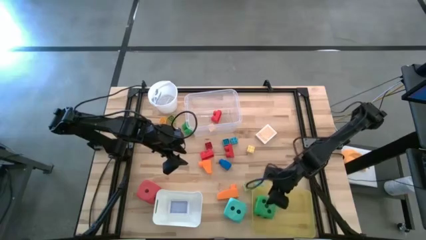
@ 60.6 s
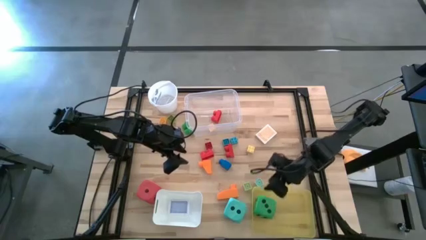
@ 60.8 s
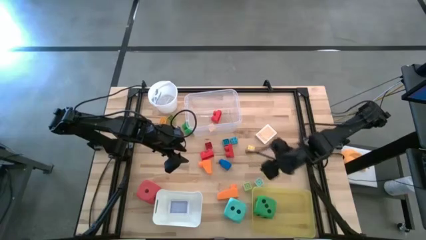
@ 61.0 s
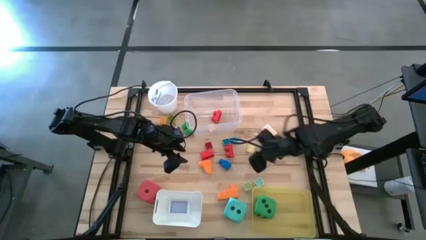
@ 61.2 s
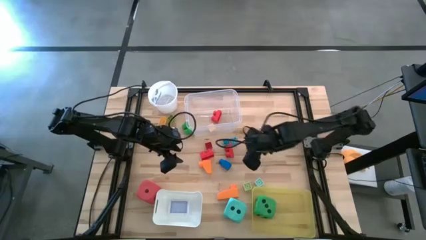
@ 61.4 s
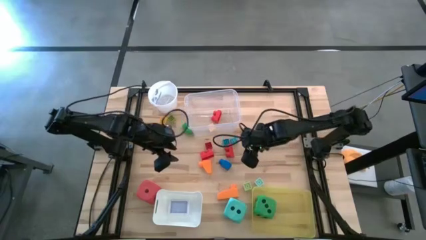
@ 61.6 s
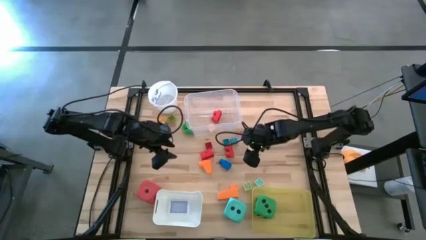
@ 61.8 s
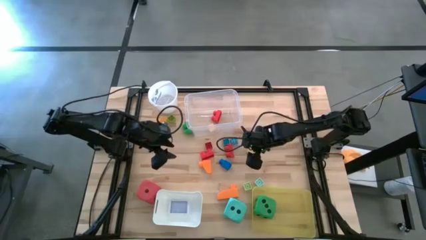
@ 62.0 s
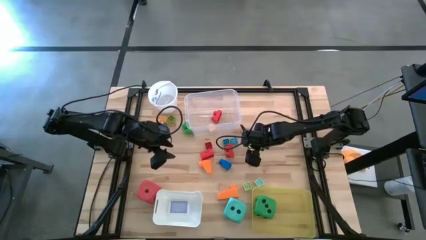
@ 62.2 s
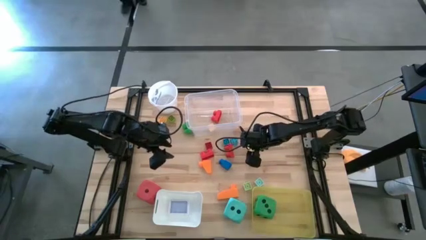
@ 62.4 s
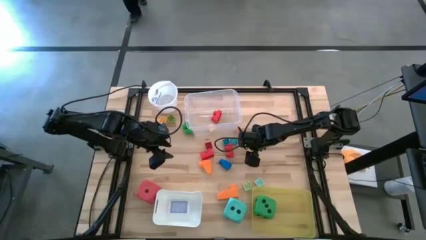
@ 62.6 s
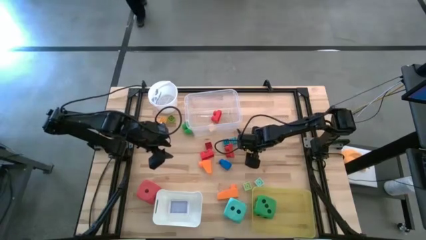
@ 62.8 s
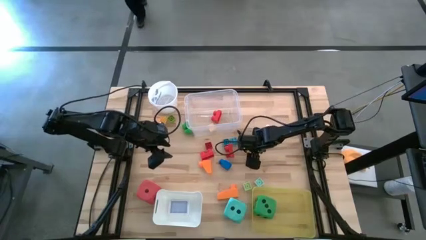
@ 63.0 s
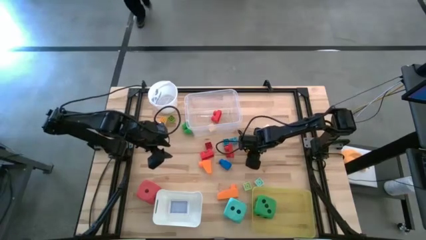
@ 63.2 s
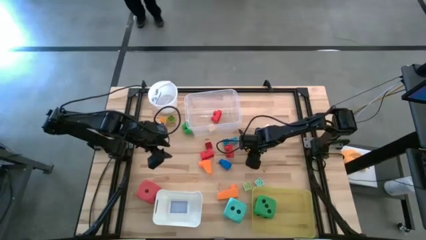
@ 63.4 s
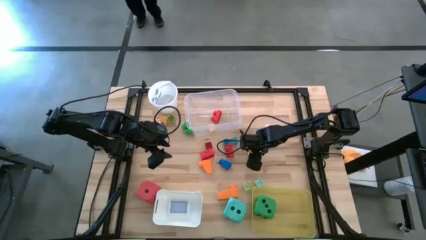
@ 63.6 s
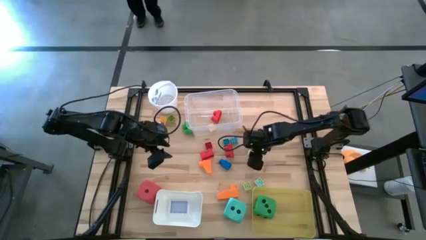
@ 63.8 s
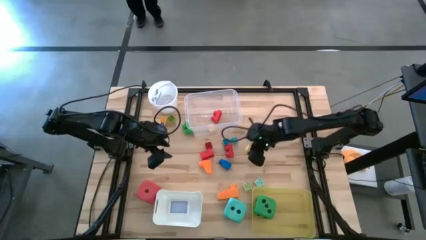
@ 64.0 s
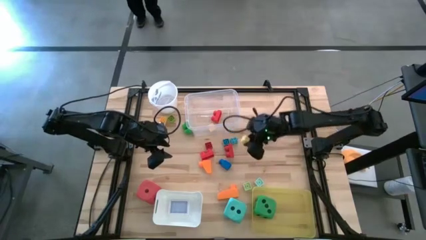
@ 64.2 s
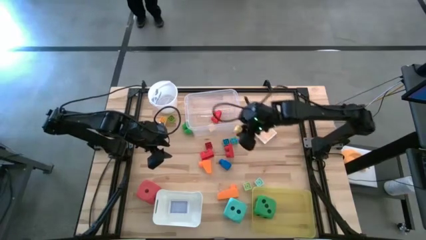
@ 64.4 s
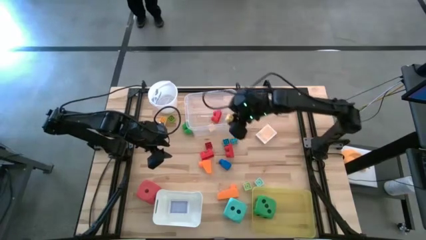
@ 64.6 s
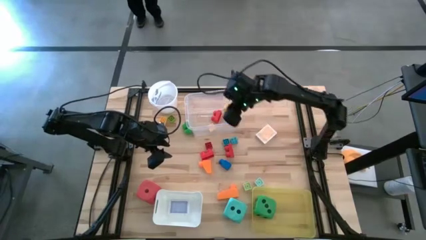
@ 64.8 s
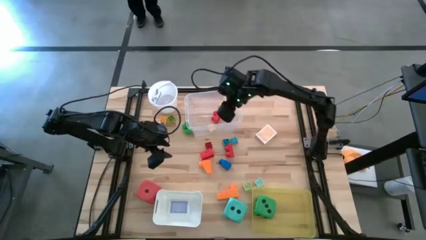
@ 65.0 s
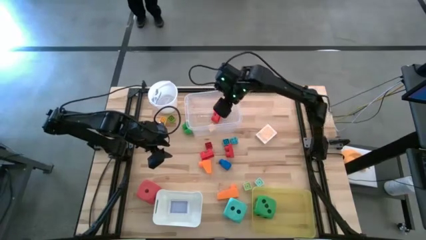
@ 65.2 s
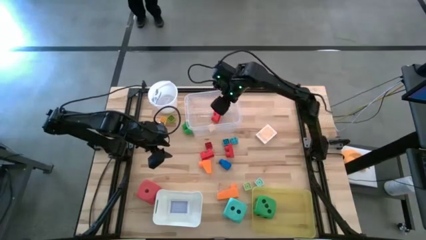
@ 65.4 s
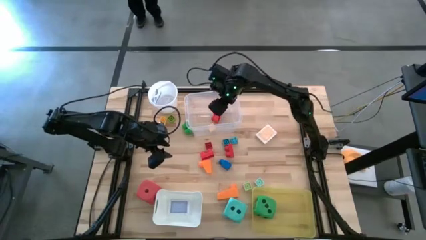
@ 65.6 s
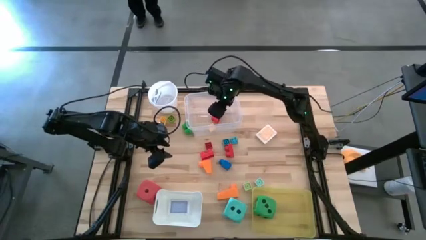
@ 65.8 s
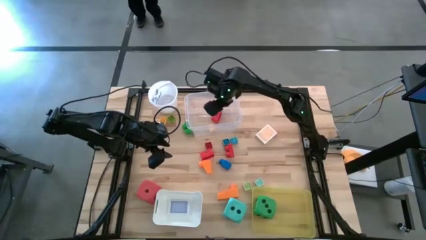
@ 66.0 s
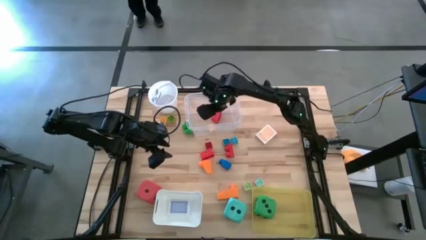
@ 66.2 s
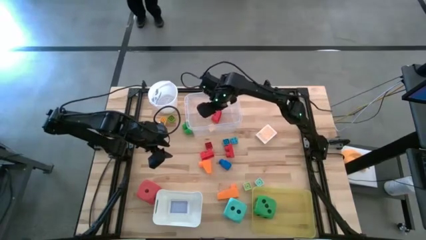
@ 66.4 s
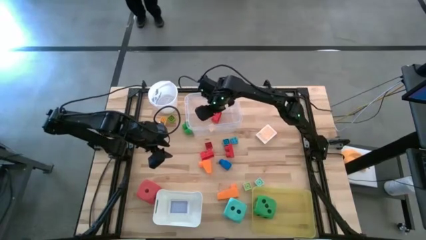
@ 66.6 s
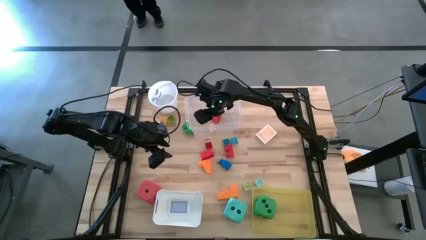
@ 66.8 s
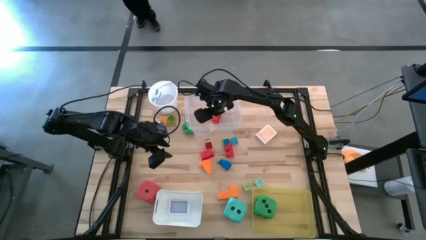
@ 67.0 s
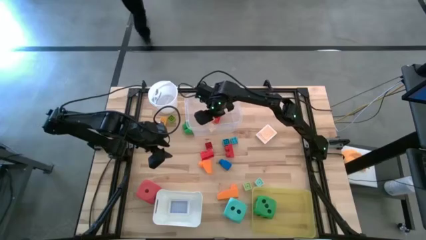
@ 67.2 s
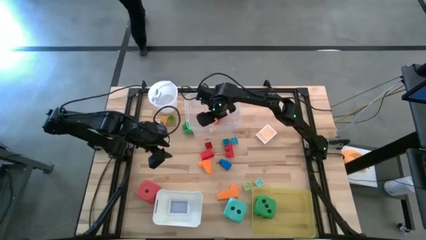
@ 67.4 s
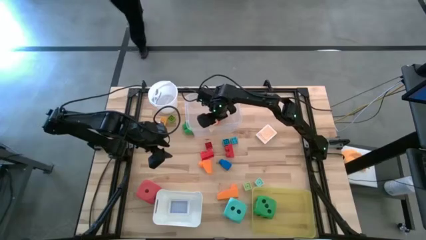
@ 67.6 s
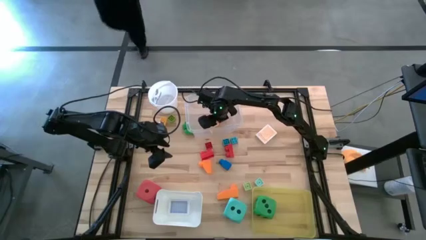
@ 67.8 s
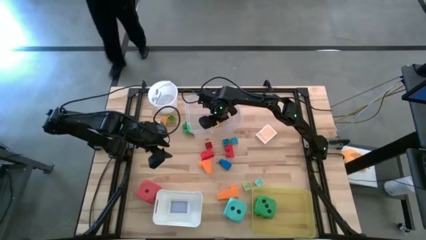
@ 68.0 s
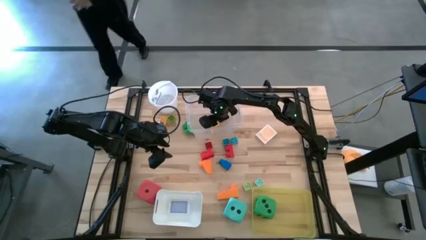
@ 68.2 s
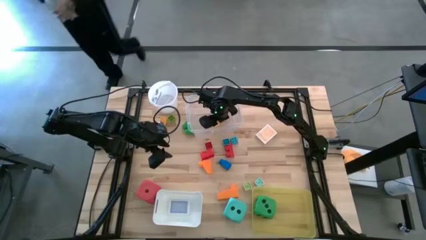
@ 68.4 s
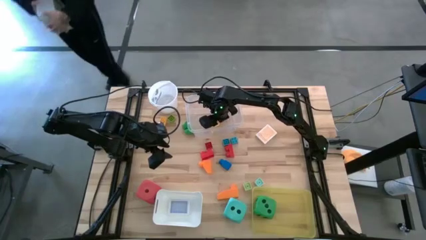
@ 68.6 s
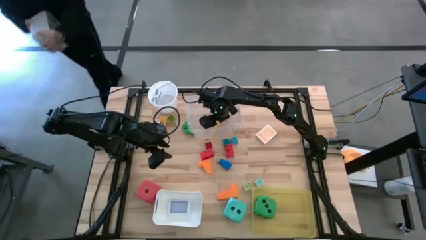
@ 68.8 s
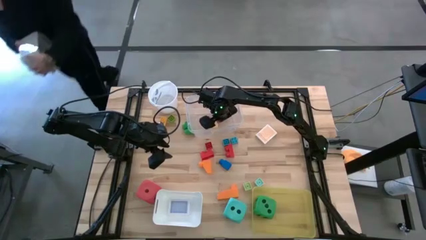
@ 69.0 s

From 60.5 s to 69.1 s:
Task: Pick & Place Toys
Put the yellow game piece into the transparent bin

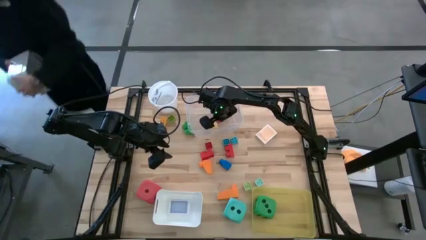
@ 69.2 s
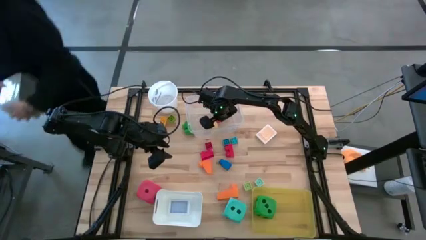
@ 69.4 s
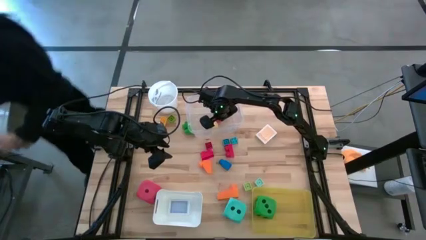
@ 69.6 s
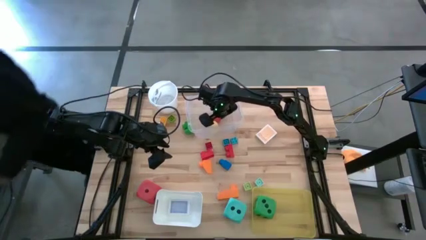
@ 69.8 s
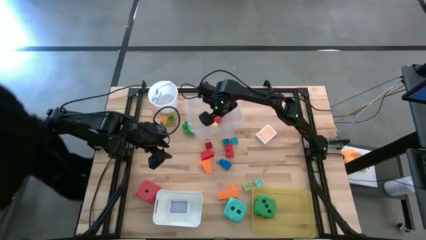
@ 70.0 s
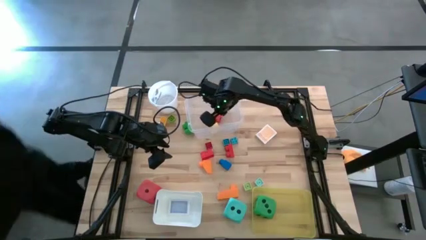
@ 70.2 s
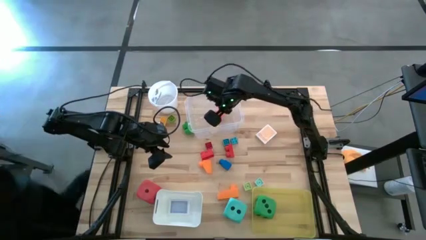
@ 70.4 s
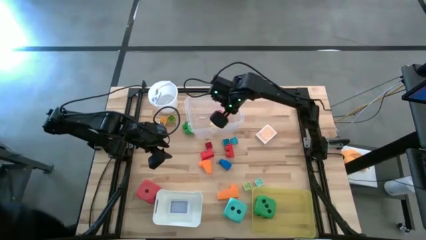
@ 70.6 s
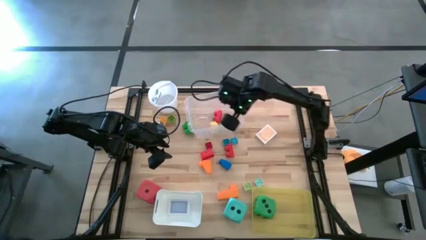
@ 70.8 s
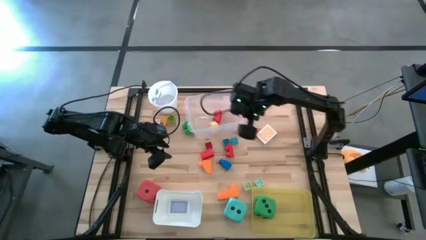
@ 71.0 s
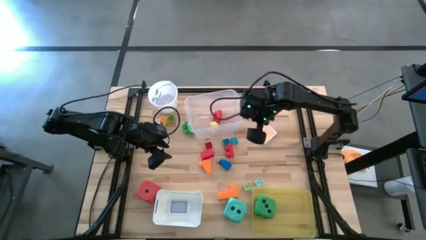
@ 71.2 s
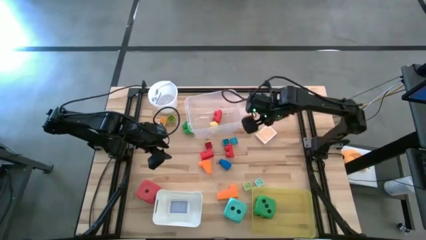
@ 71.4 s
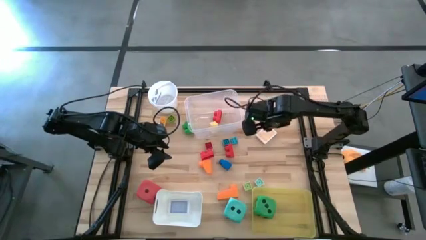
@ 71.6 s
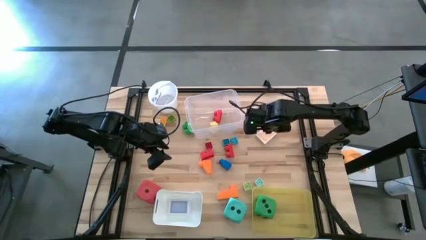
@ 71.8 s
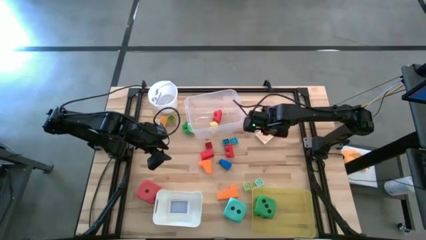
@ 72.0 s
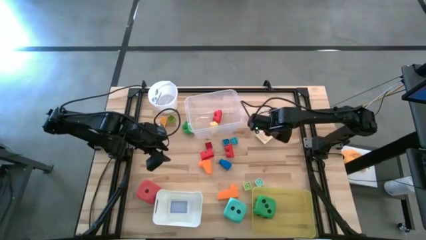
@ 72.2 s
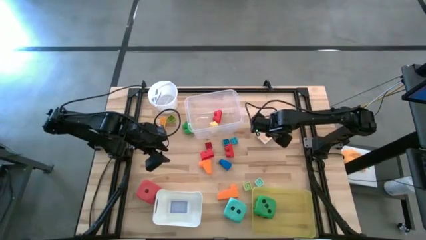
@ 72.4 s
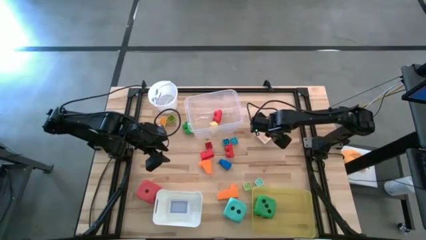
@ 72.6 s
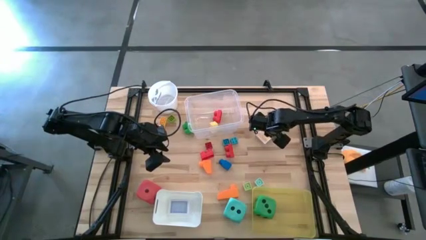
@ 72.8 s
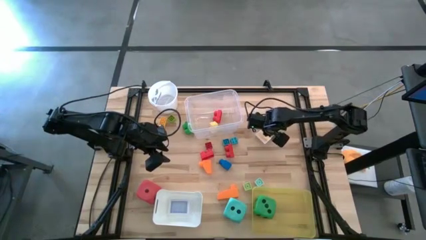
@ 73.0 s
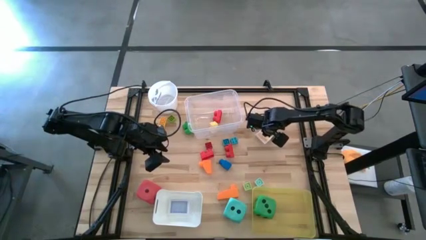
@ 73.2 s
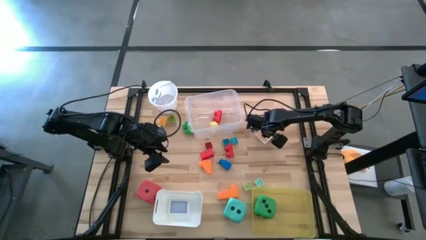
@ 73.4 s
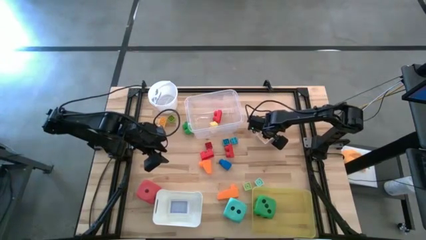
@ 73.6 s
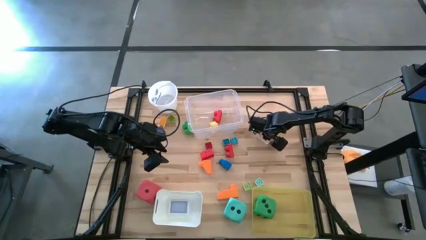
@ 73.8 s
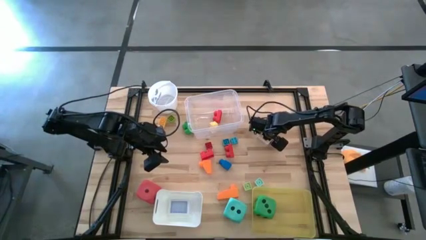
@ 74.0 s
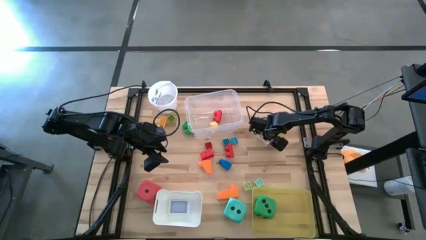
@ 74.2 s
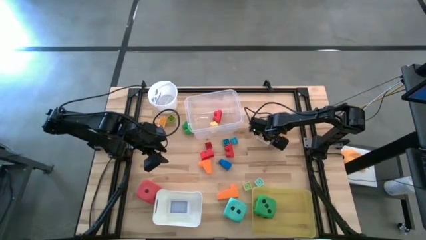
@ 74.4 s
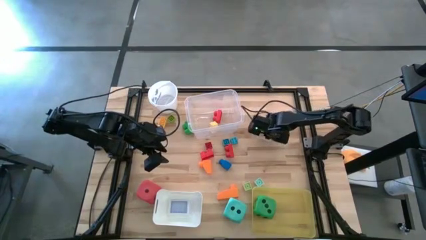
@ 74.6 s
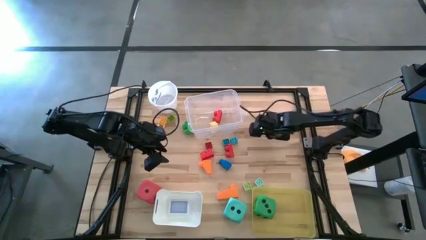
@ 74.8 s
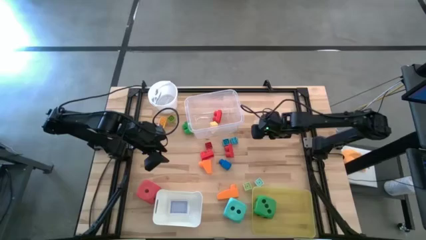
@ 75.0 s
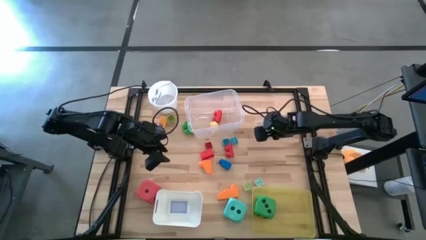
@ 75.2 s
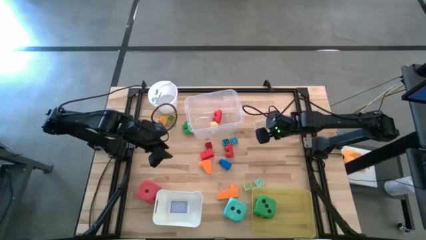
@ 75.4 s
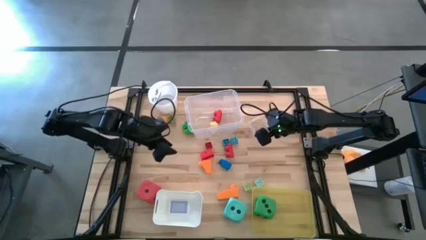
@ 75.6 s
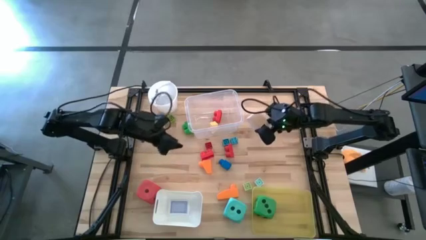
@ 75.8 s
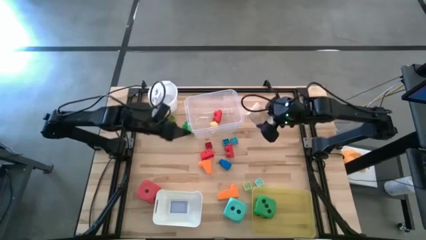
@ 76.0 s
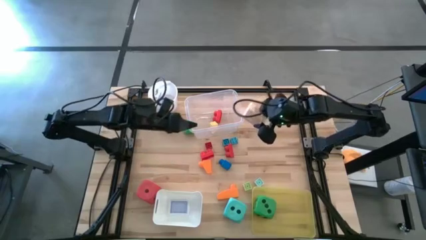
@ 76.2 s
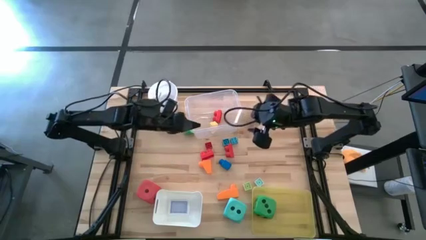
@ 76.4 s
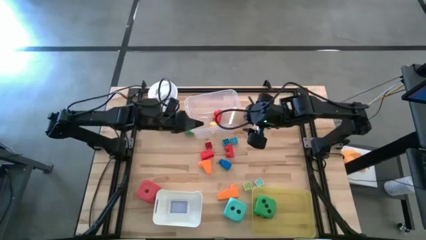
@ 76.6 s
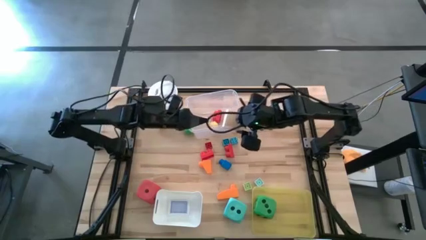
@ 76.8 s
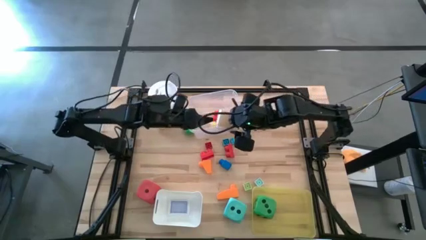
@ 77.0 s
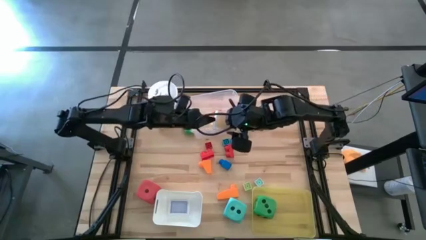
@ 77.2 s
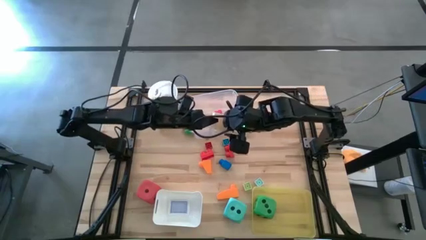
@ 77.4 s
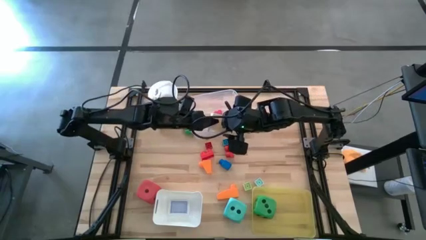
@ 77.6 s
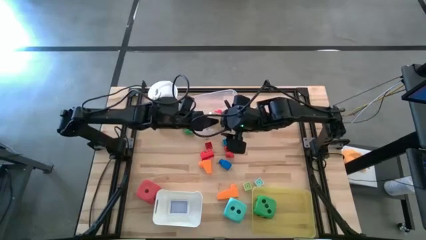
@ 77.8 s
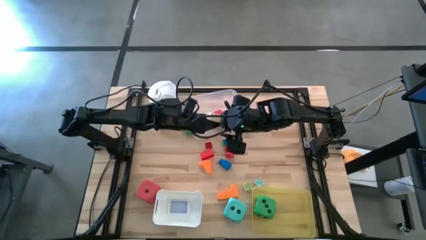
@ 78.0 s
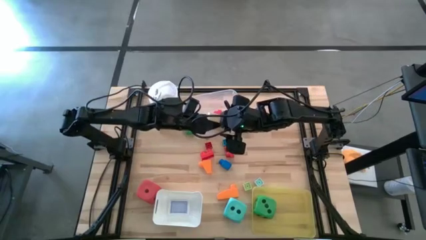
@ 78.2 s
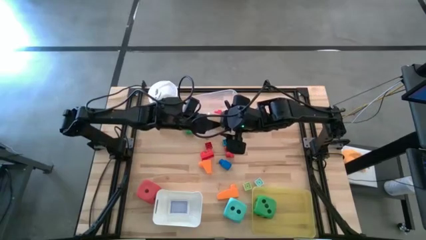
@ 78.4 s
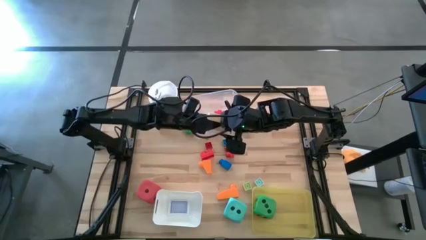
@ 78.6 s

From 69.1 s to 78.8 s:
Put the orange deck of cards into the white bin
